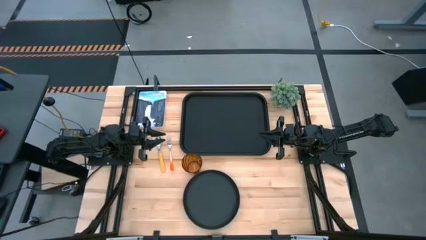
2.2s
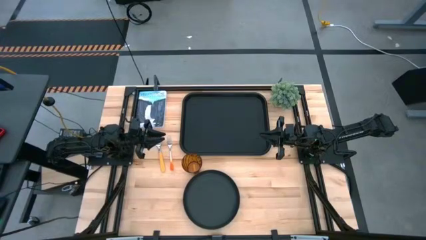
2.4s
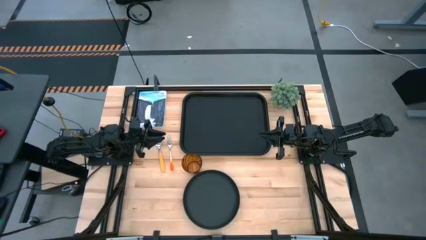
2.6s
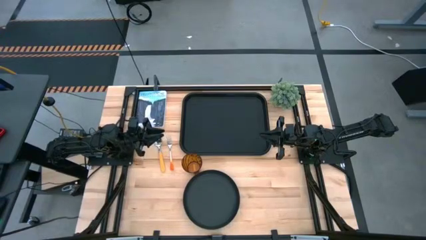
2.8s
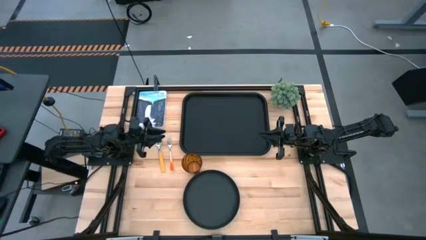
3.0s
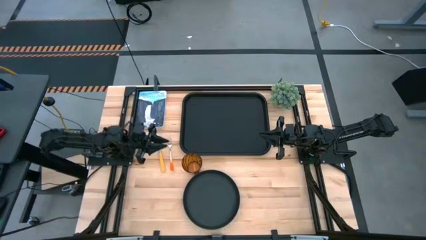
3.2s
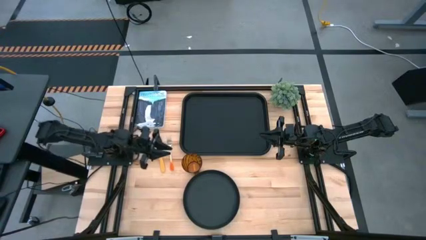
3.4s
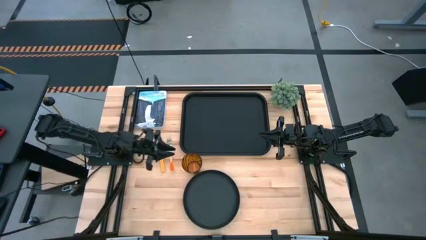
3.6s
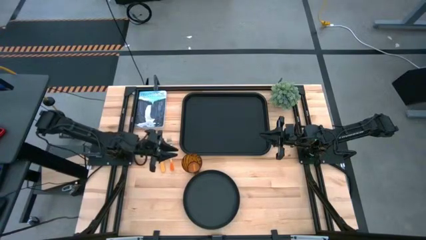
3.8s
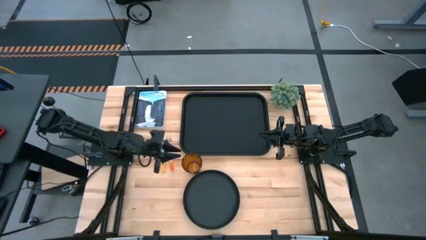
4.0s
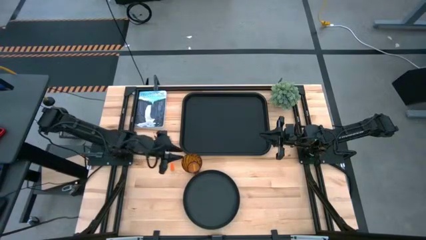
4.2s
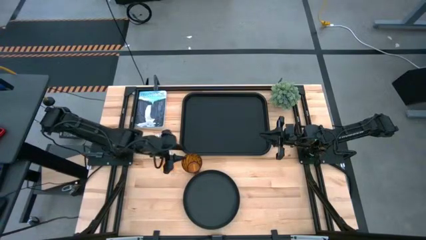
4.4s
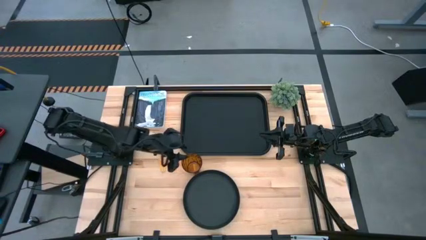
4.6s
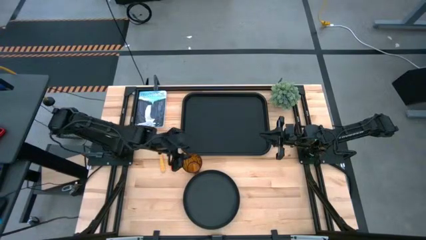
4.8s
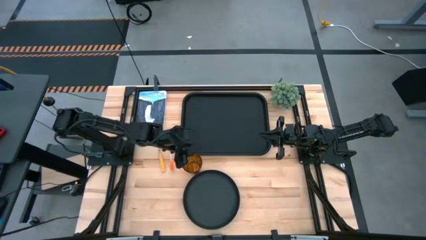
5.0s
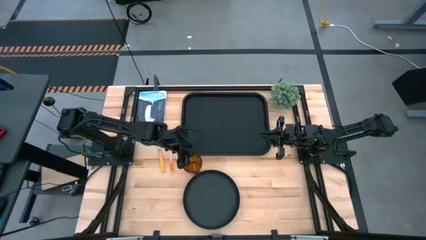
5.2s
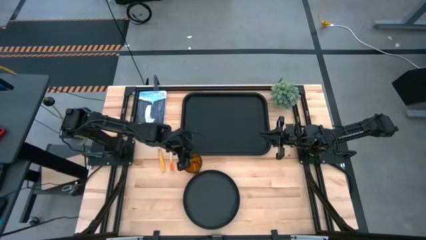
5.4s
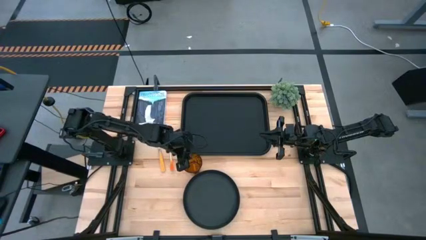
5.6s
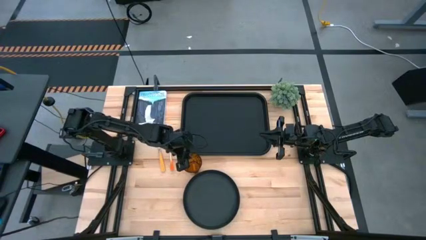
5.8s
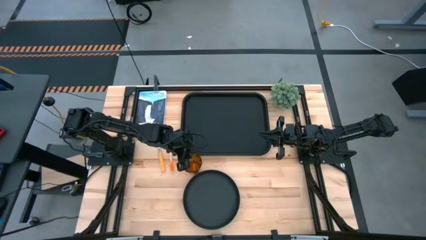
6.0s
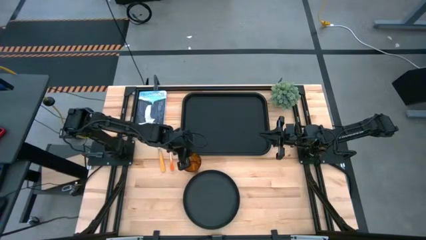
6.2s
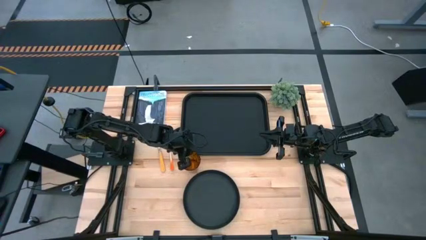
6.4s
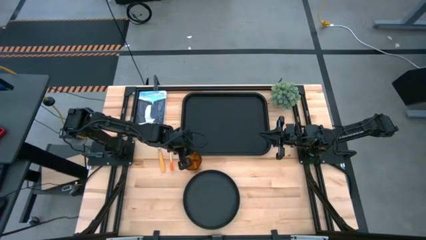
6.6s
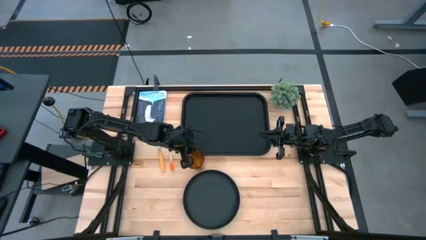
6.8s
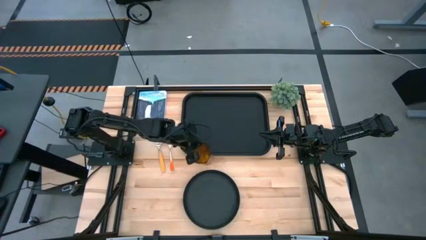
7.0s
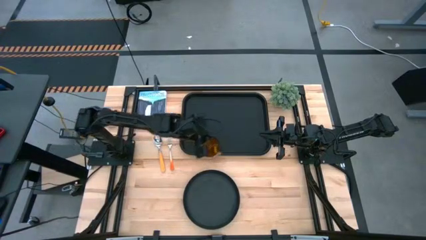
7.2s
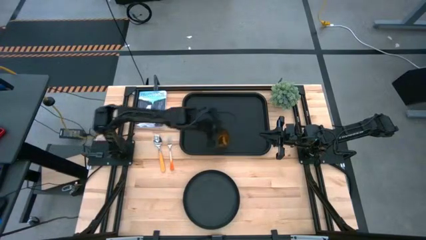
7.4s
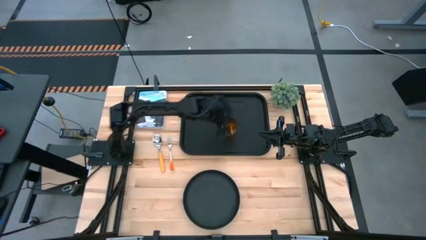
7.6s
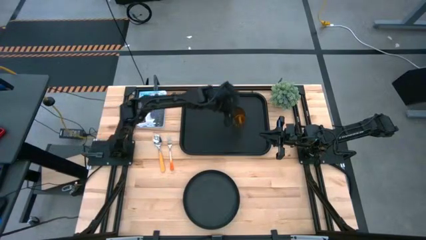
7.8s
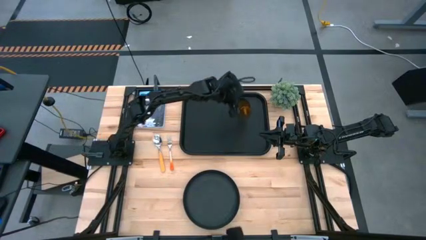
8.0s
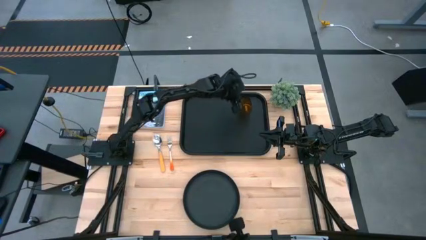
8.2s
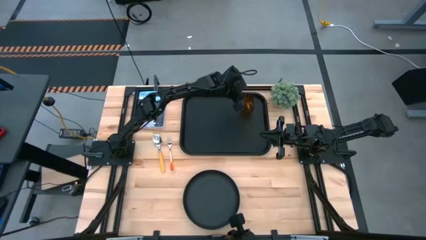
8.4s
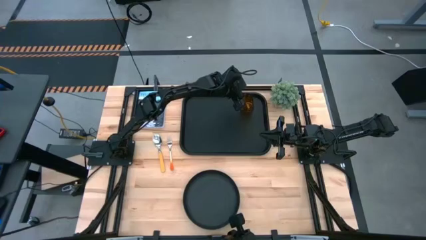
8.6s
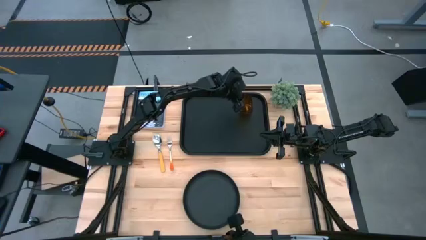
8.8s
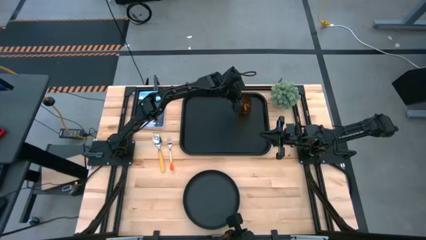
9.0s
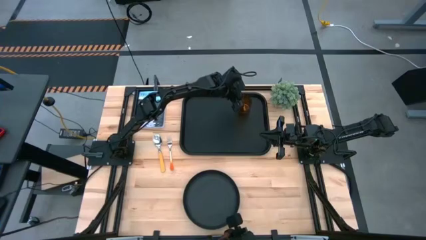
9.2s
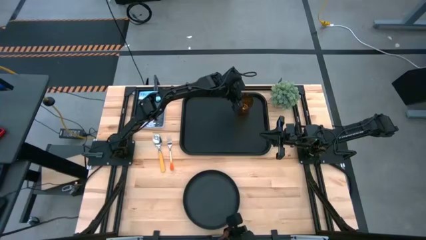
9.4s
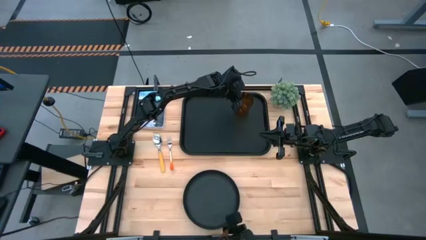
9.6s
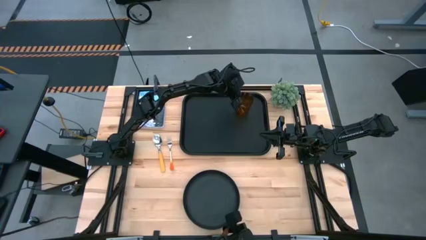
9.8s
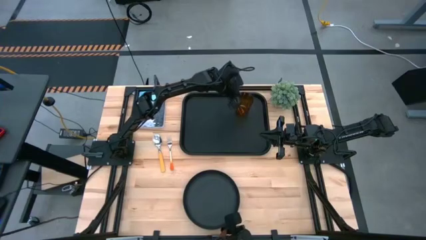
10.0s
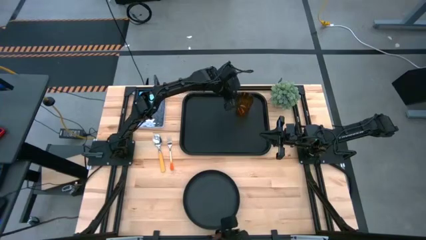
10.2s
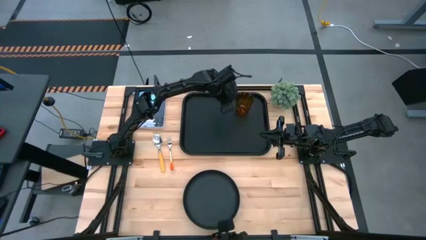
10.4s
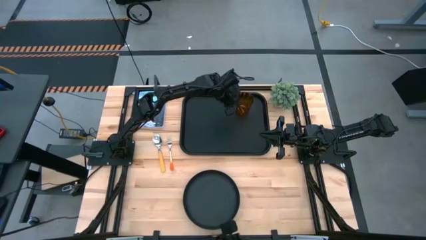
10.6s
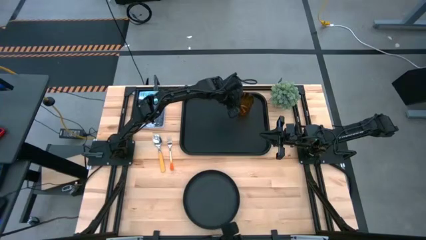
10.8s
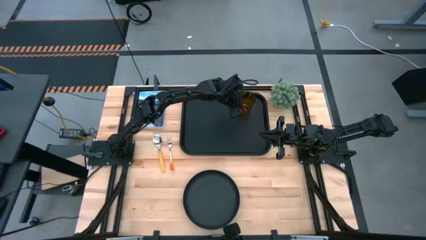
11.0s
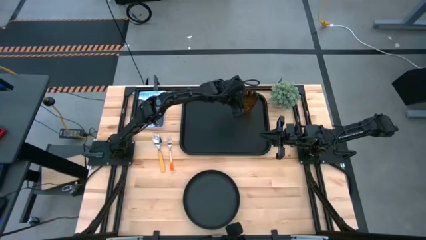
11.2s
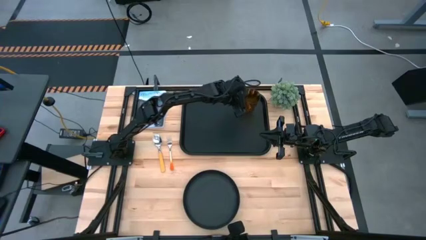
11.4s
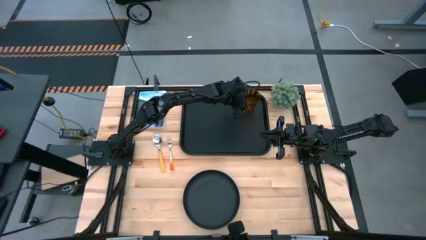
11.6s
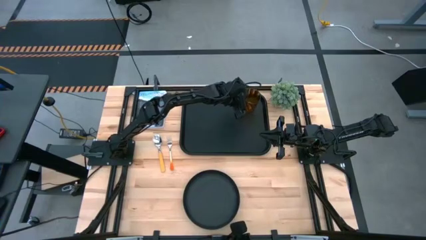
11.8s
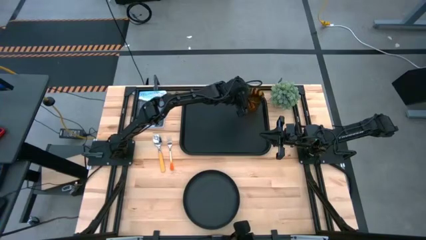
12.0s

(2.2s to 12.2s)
Task: Pick and place plate/cup/fork/spoon on tray
Put the brown cup on the black serving tray

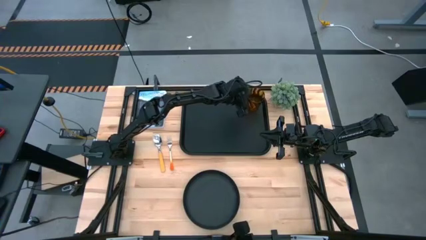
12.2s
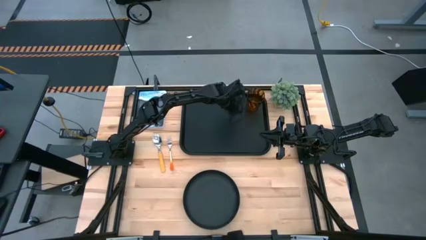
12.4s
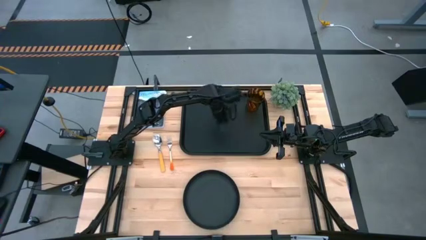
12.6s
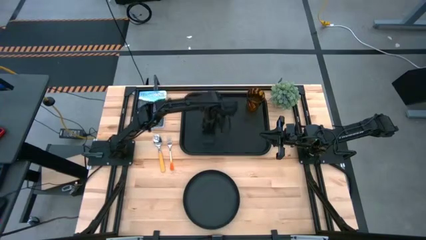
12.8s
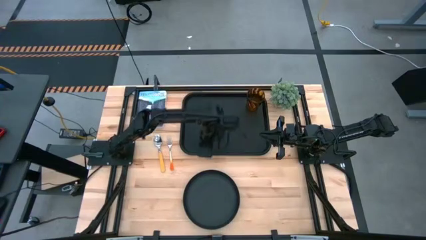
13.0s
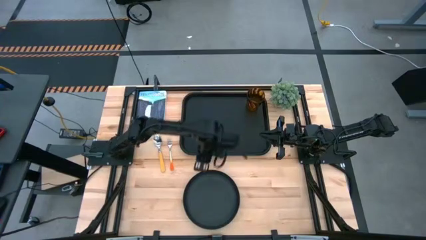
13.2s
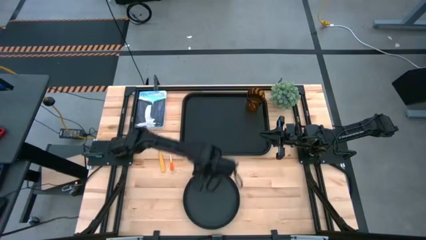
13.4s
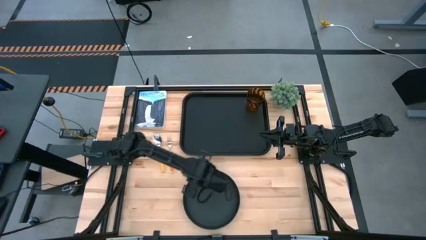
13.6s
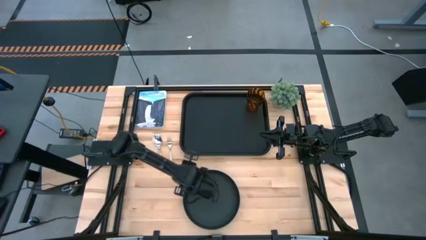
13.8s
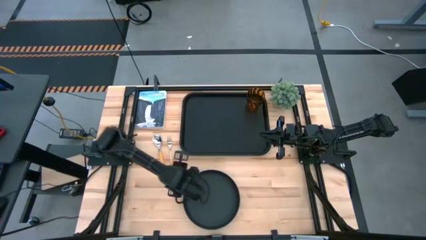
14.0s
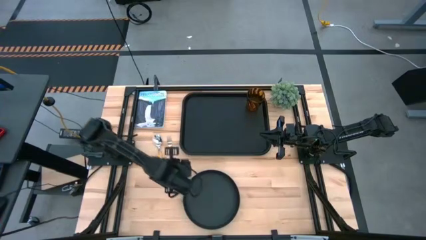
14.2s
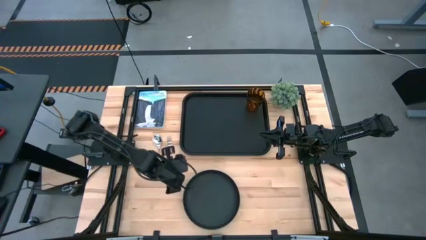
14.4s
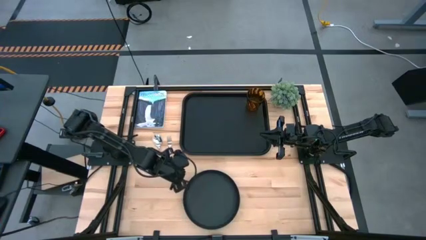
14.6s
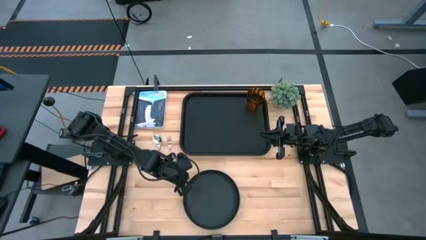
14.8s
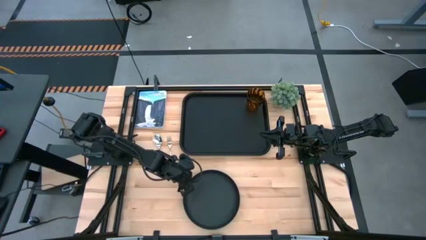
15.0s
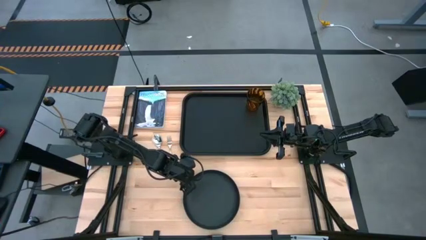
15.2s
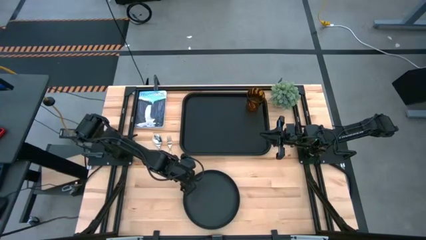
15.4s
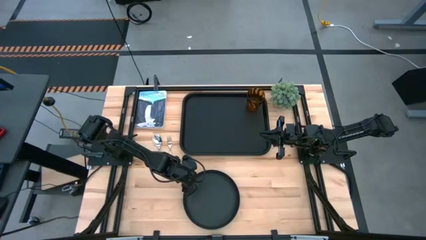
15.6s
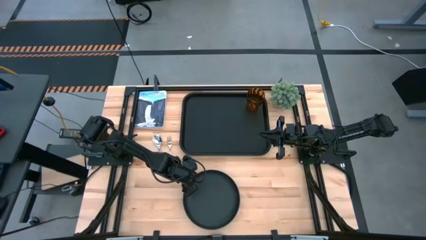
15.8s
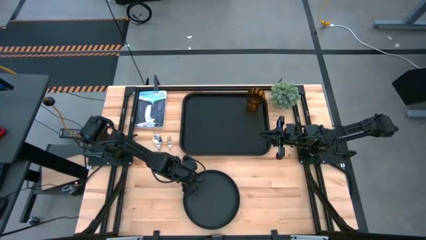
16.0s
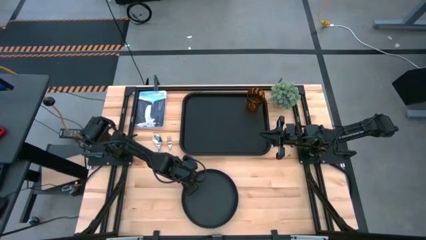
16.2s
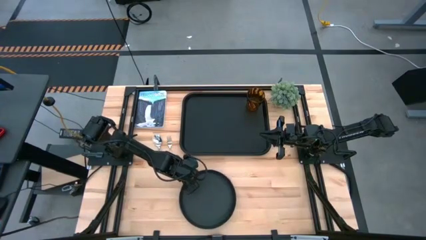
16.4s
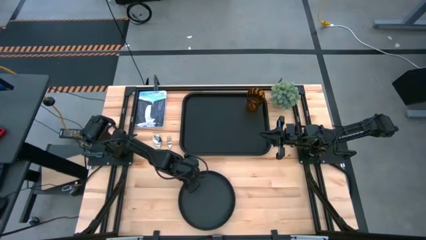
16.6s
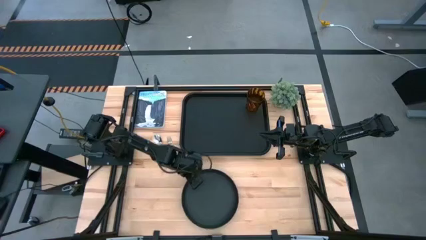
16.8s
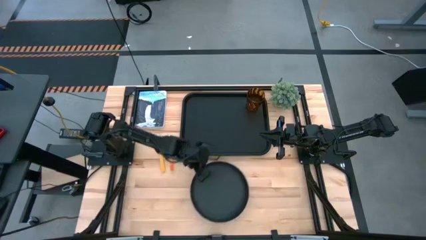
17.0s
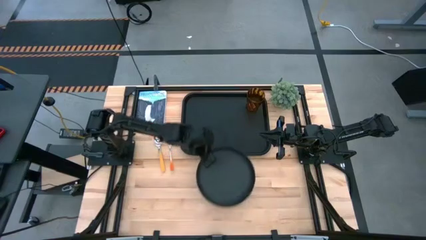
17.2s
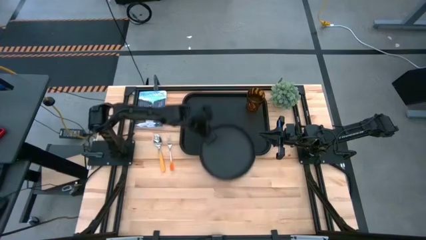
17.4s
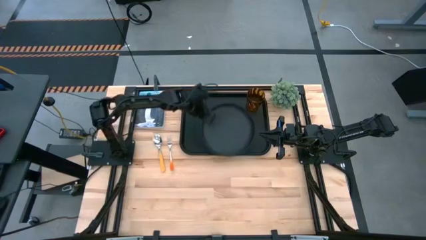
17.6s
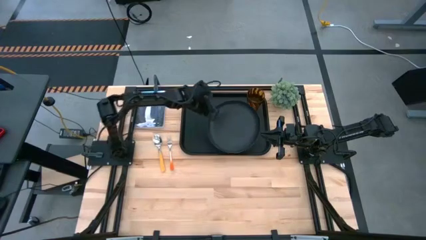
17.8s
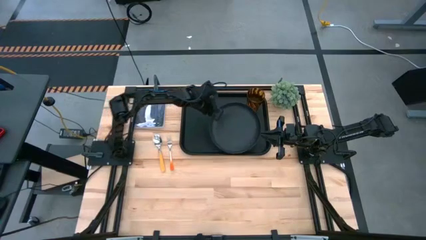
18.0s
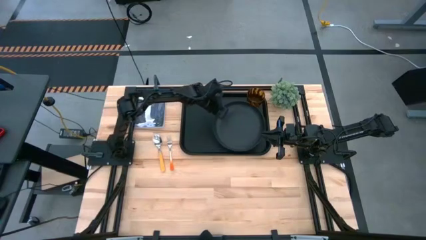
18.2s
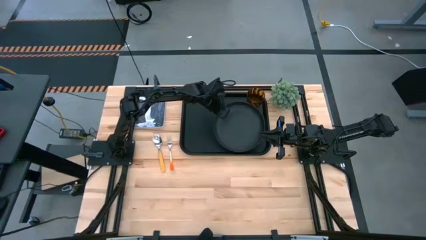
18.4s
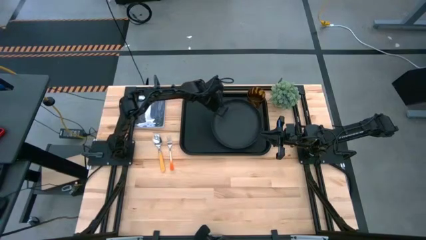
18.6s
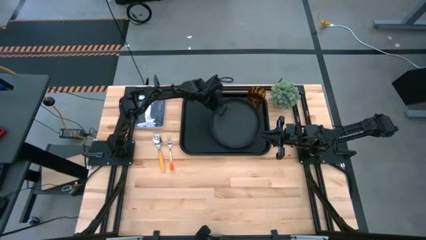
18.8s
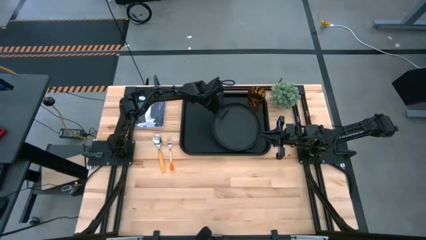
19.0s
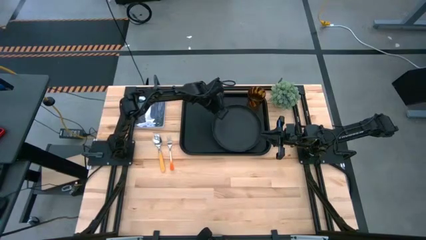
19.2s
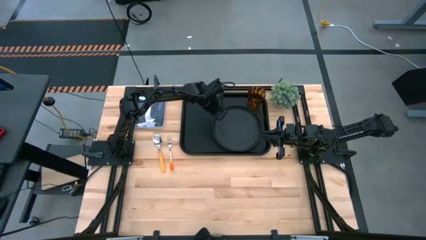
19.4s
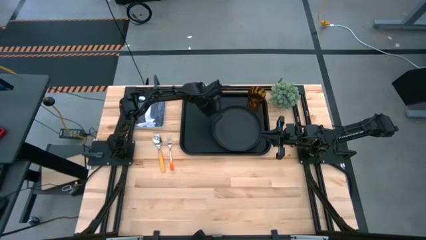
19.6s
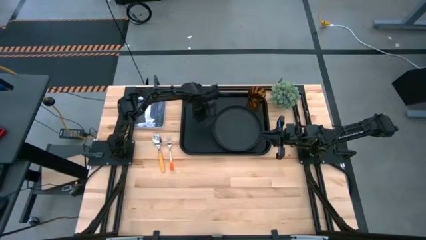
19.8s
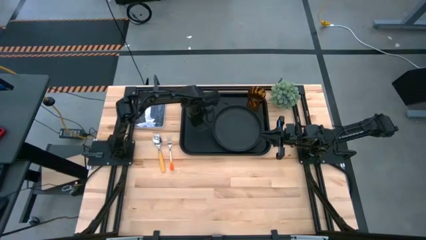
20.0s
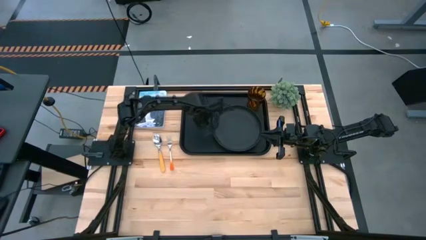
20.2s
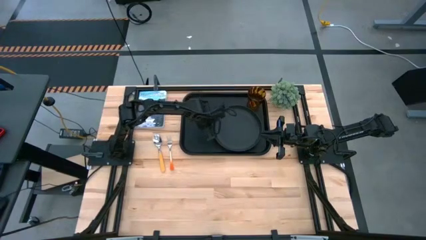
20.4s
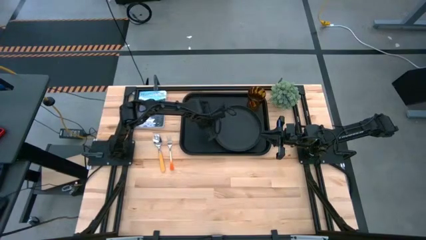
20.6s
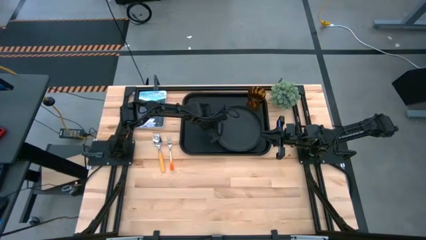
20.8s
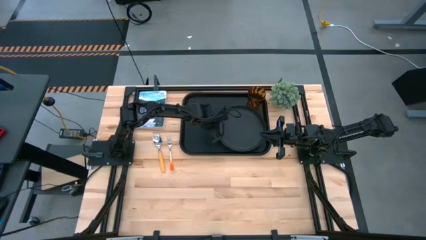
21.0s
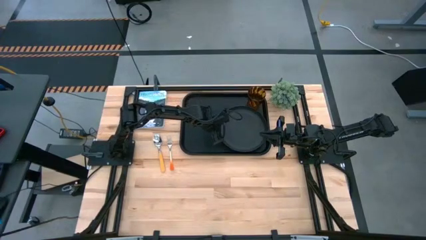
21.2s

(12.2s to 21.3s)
Put the black plate on the black serving tray
